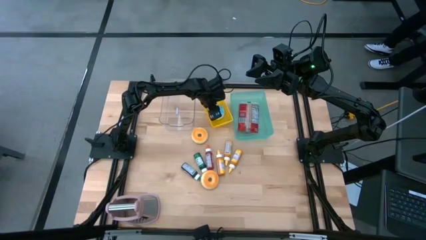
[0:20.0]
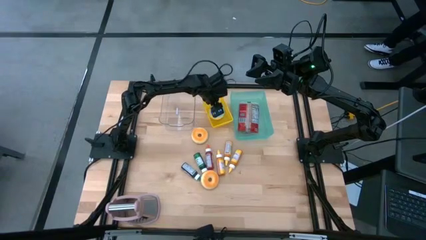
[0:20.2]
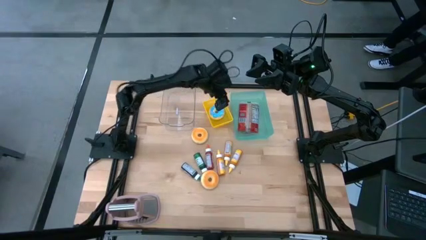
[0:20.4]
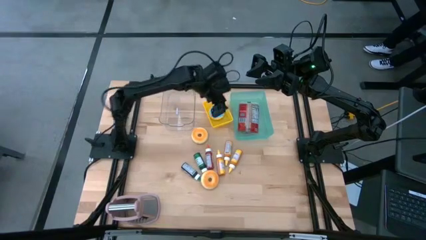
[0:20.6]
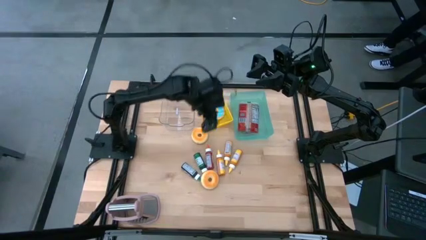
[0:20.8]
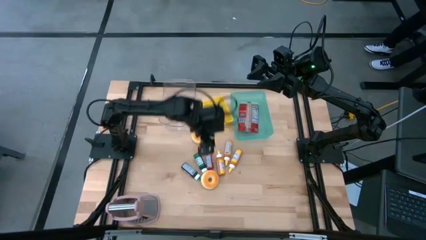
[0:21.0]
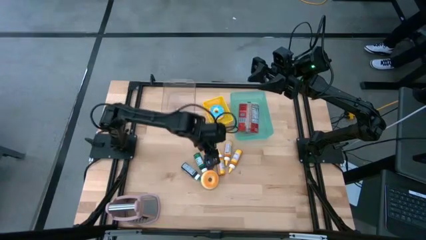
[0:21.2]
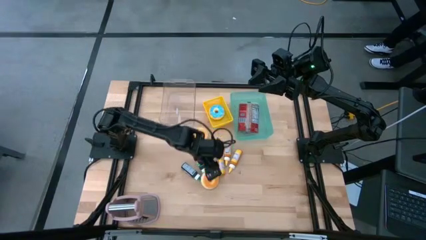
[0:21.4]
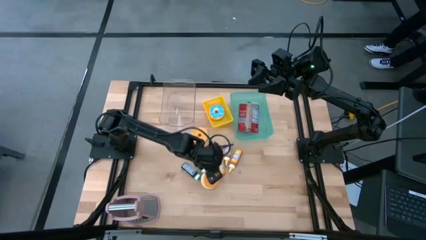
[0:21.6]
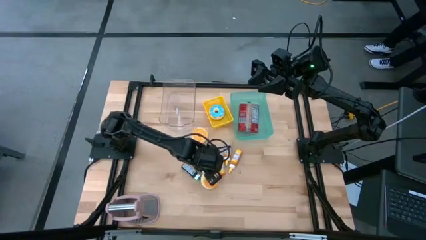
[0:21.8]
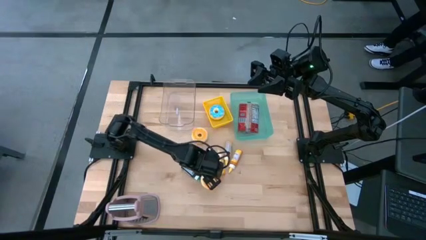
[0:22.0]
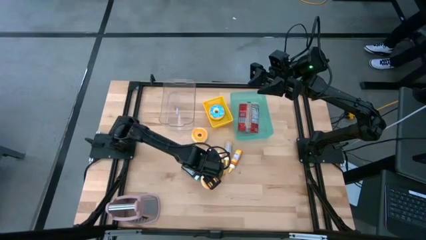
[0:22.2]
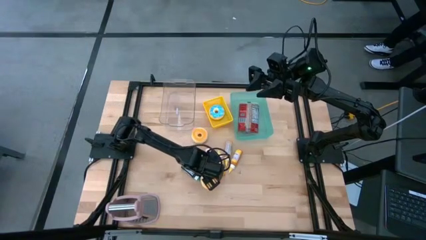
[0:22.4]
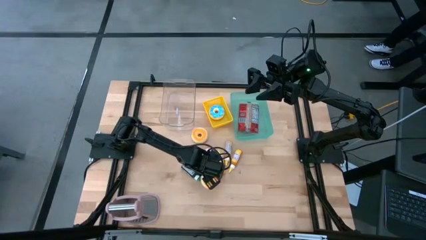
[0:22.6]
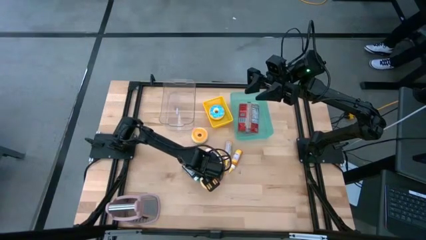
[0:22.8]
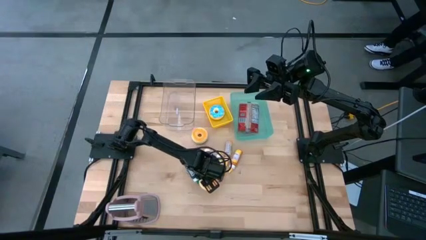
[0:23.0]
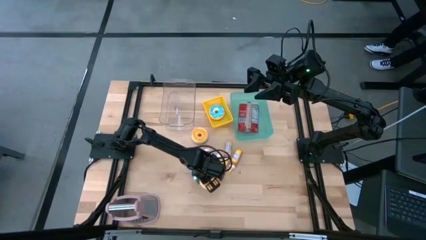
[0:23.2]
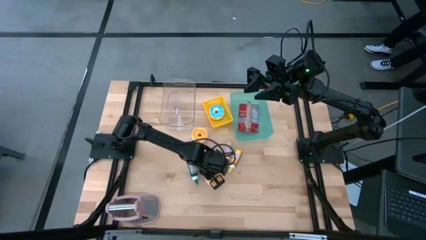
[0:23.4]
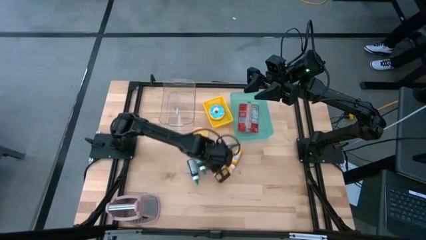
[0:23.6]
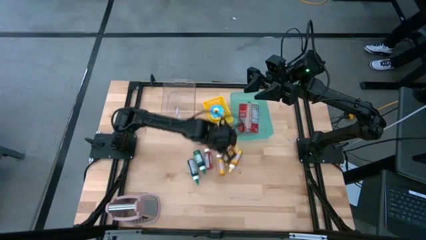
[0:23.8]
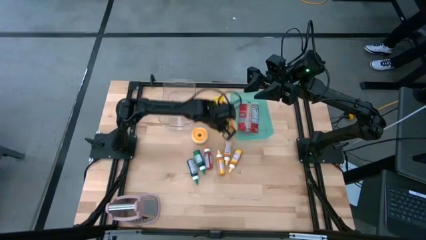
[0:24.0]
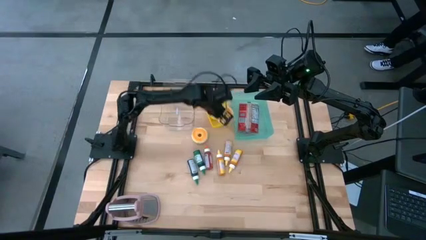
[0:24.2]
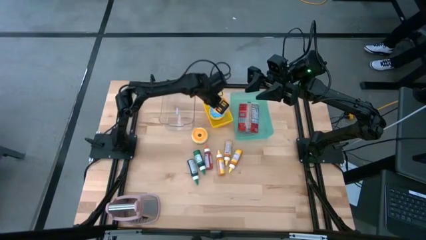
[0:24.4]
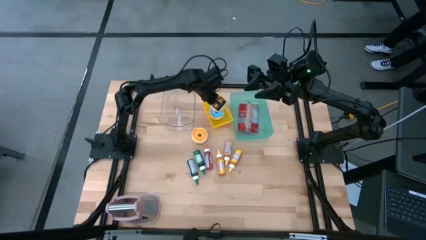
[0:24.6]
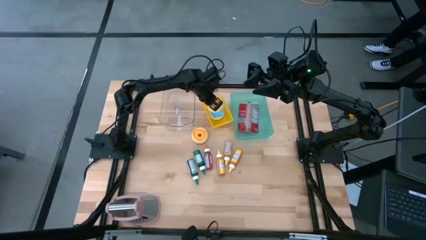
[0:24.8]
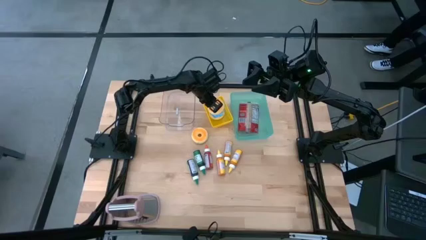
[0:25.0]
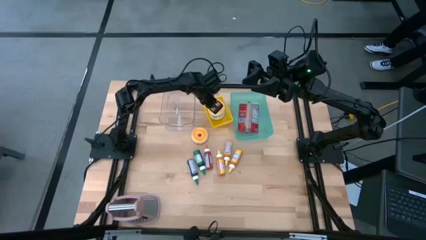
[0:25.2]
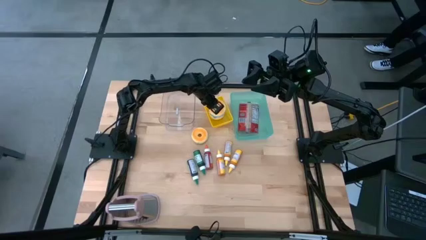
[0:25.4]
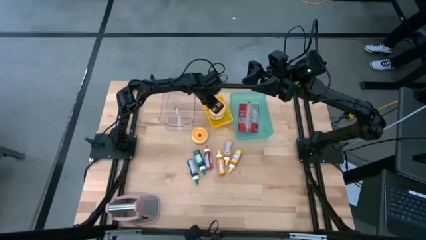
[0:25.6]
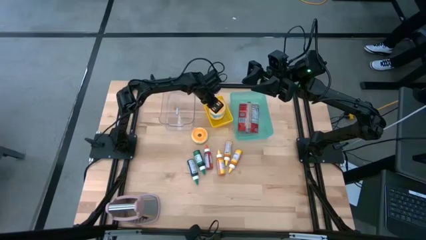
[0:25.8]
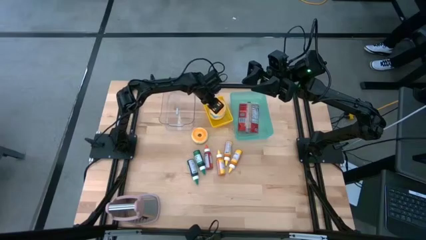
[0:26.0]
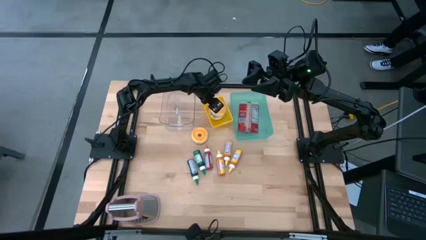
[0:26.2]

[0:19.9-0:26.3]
Put the bottom yellow donut into the yellow bin

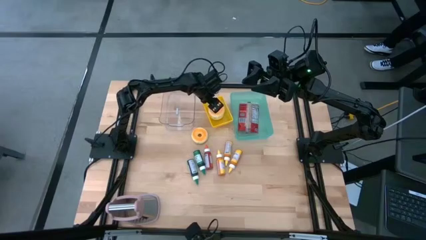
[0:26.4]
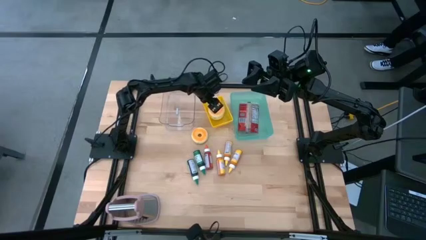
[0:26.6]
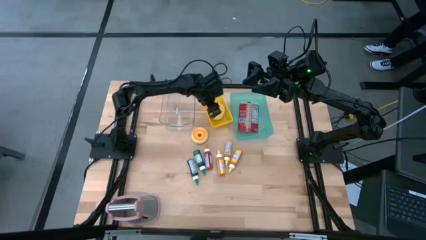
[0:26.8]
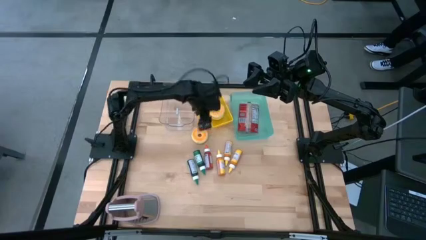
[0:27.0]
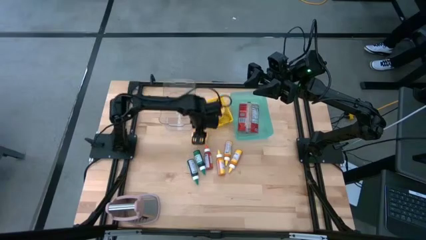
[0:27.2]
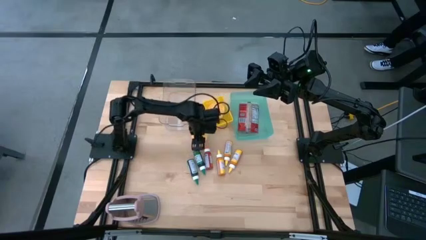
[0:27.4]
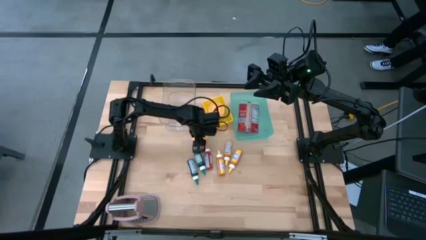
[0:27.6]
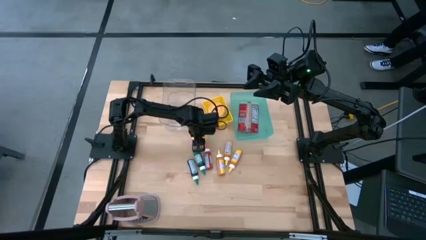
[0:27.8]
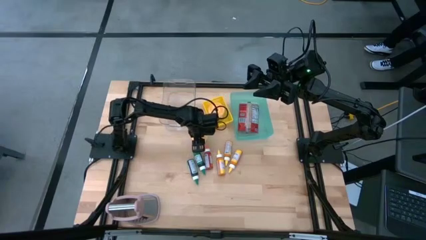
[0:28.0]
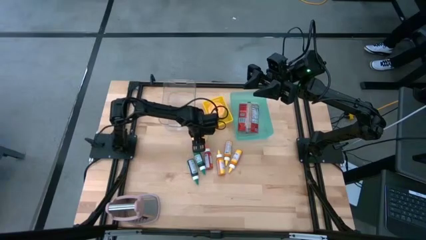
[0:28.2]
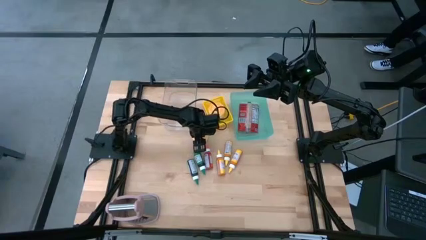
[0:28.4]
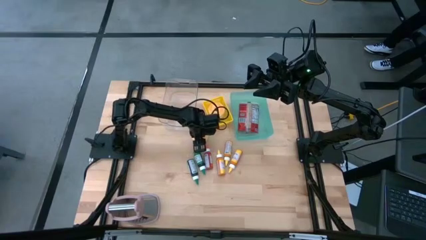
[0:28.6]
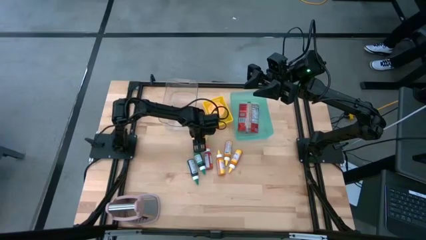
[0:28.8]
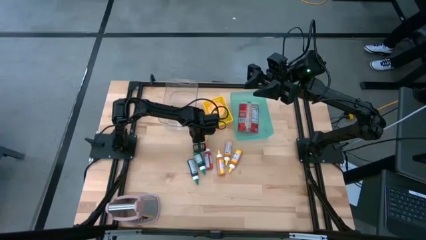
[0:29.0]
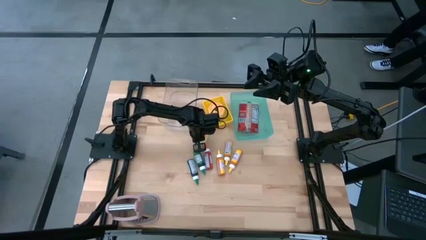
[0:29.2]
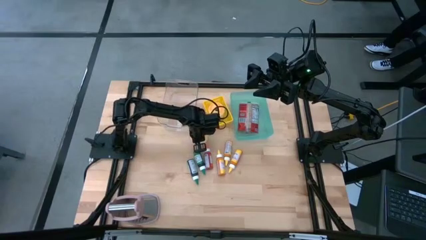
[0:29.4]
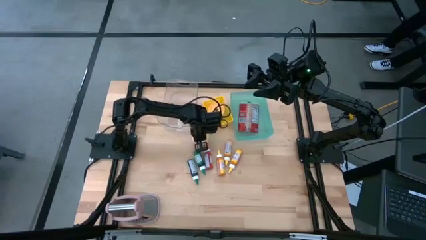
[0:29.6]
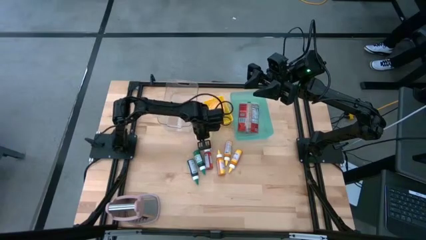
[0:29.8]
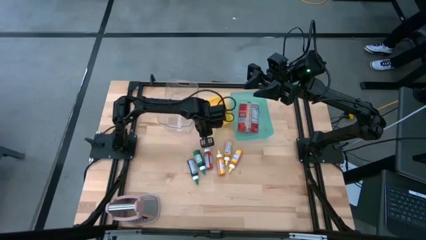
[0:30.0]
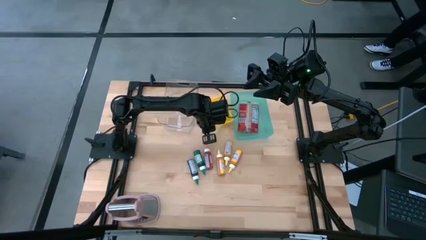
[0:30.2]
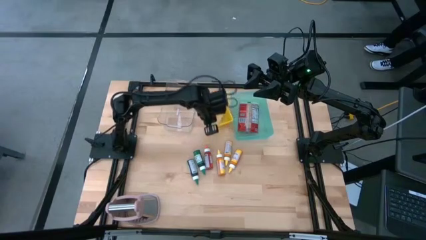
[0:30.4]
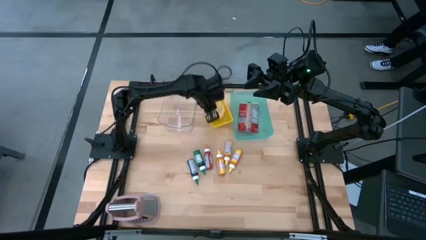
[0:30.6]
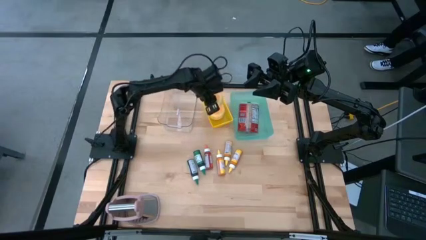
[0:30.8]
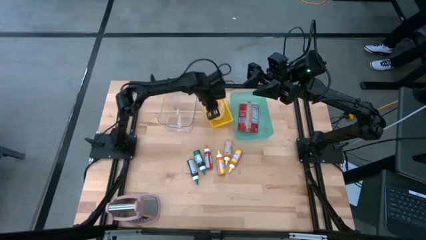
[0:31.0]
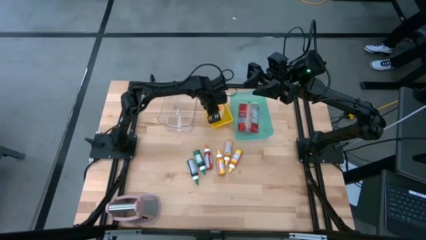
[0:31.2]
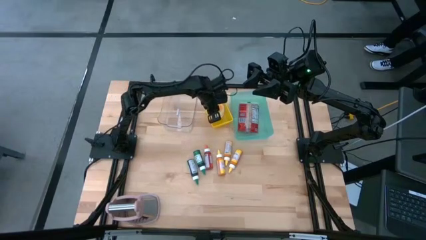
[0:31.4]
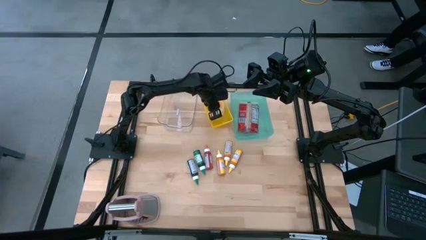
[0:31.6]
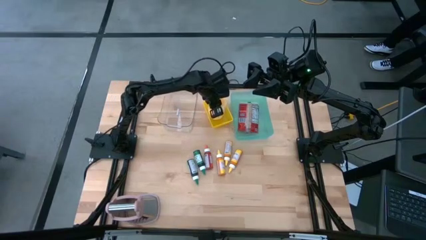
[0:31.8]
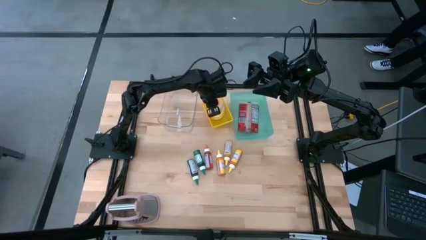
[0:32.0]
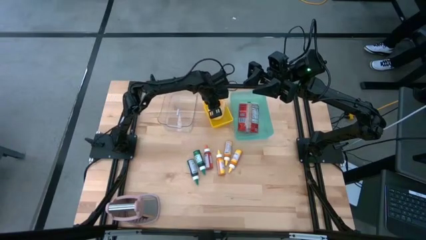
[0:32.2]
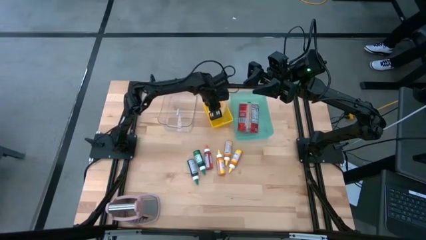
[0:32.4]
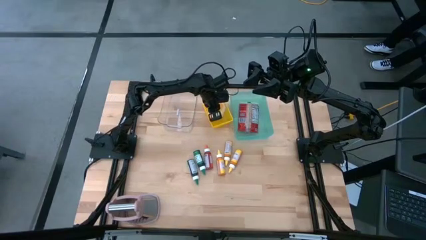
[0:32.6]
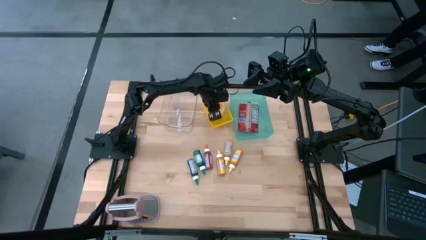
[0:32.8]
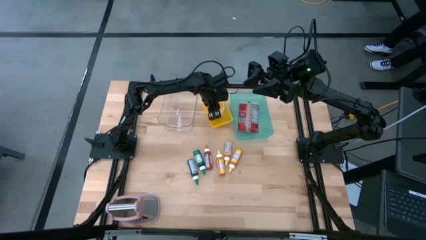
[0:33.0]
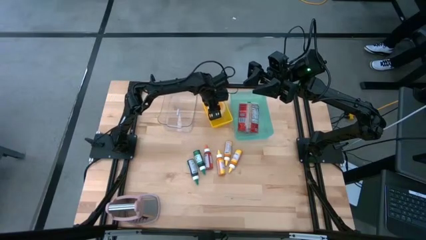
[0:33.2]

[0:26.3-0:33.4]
Put the yellow donut into the yellow bin
